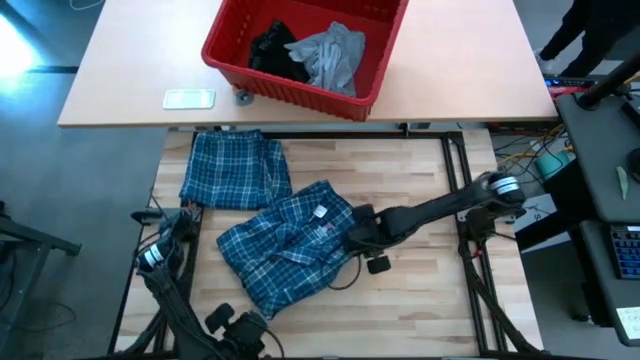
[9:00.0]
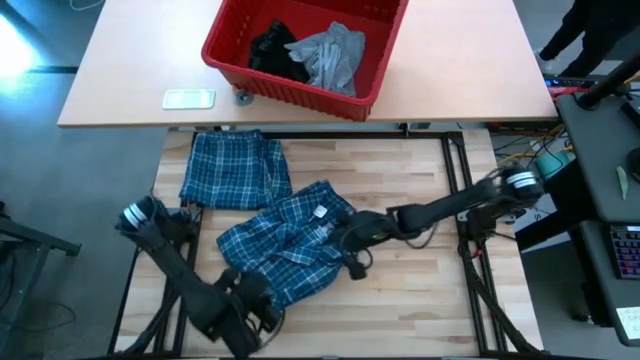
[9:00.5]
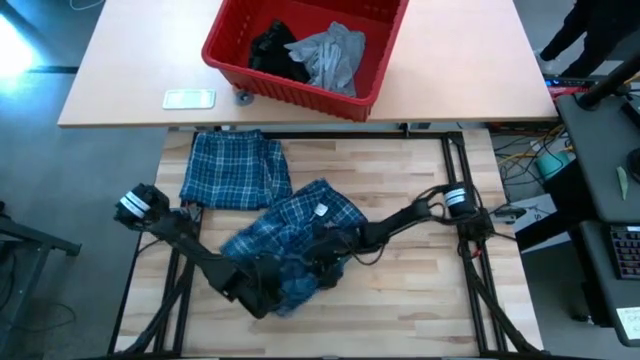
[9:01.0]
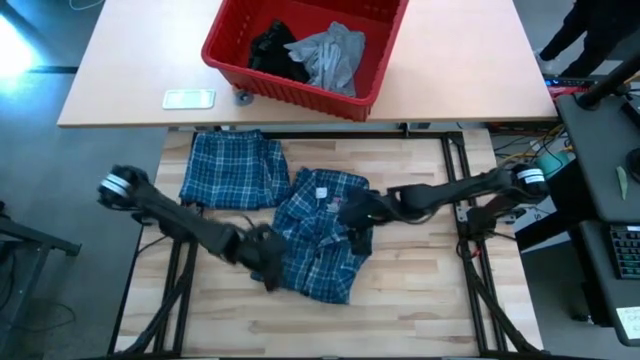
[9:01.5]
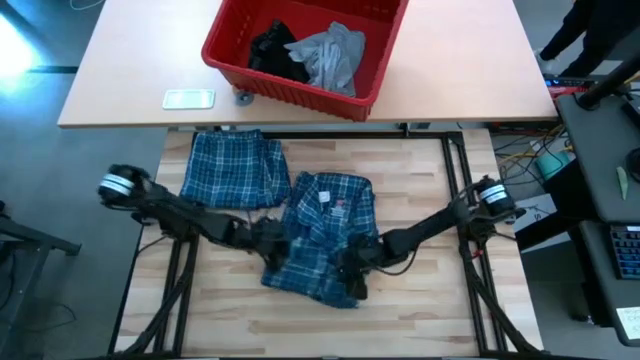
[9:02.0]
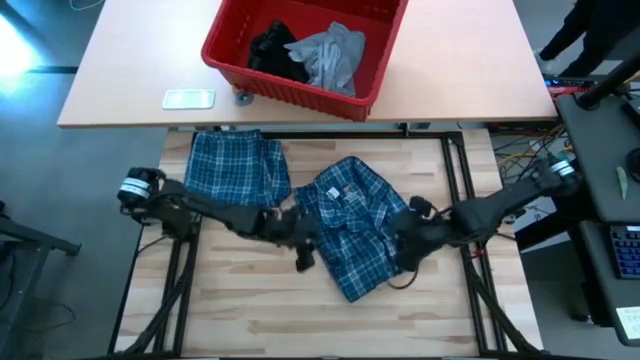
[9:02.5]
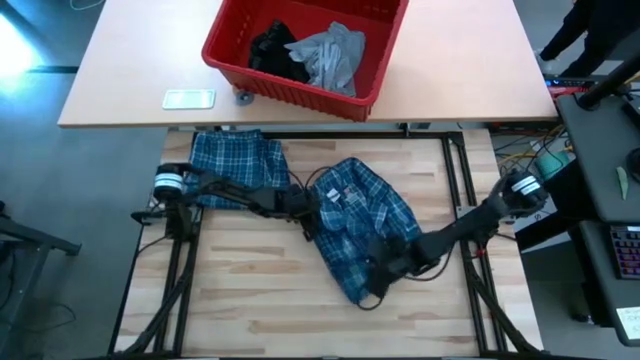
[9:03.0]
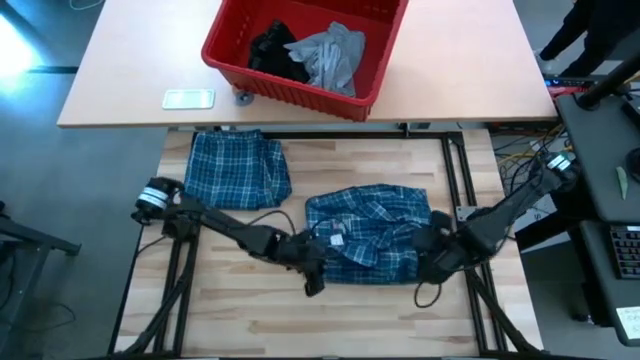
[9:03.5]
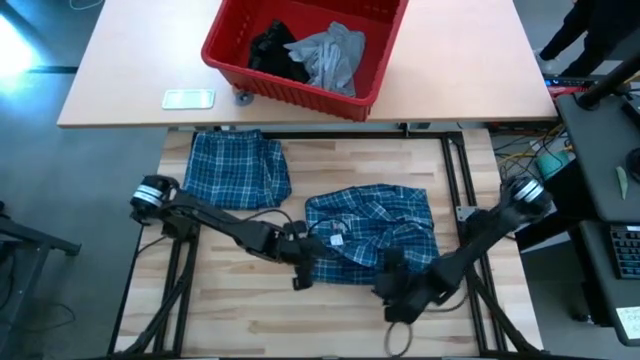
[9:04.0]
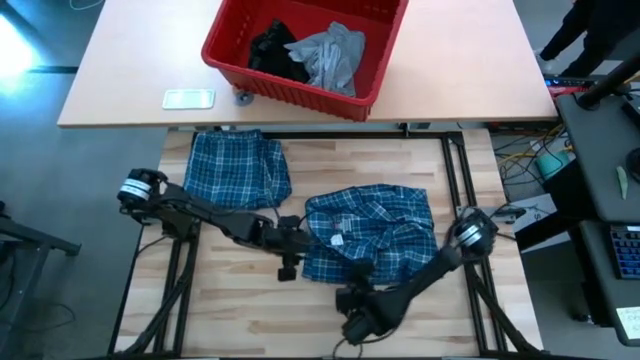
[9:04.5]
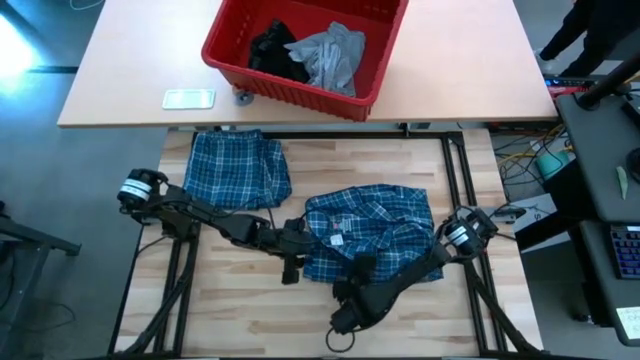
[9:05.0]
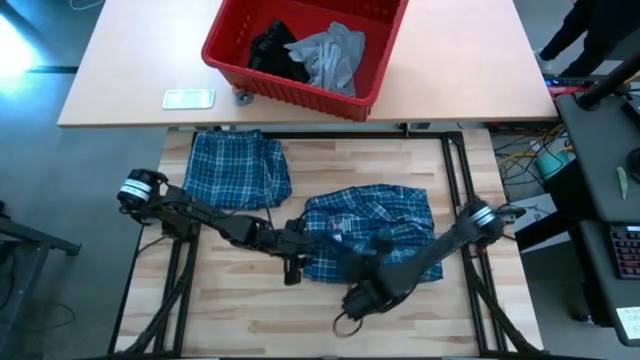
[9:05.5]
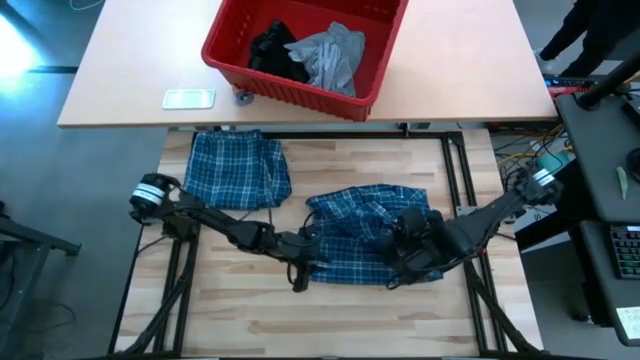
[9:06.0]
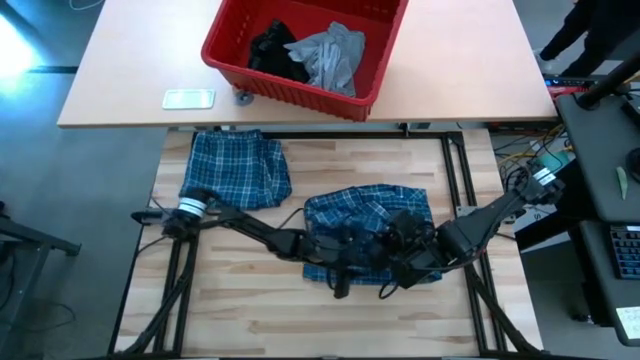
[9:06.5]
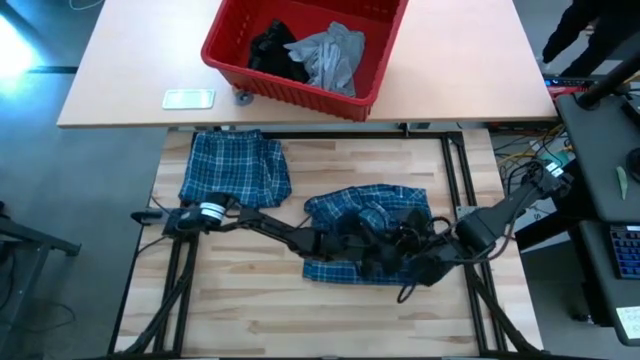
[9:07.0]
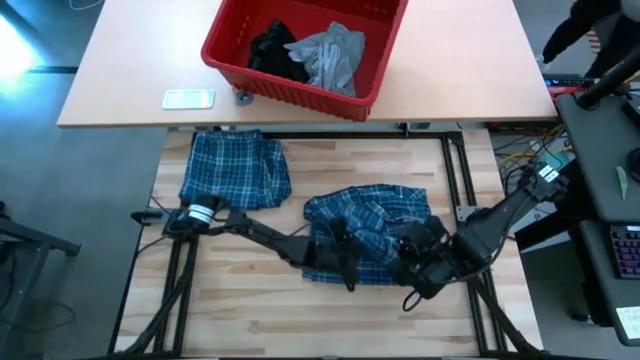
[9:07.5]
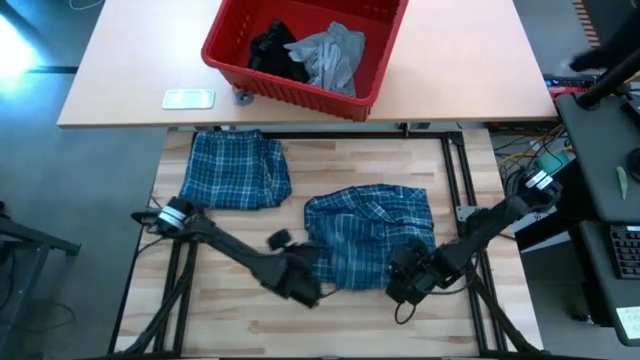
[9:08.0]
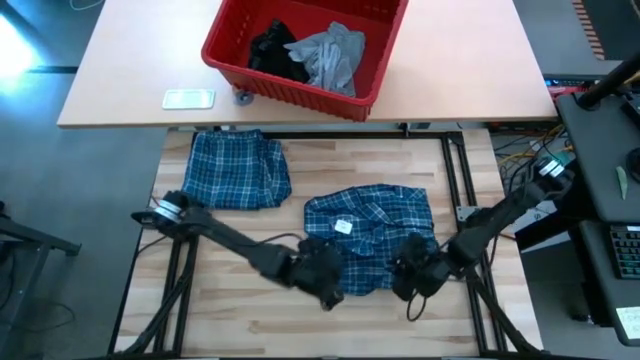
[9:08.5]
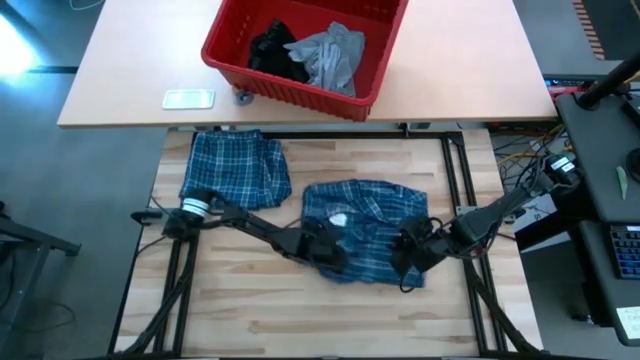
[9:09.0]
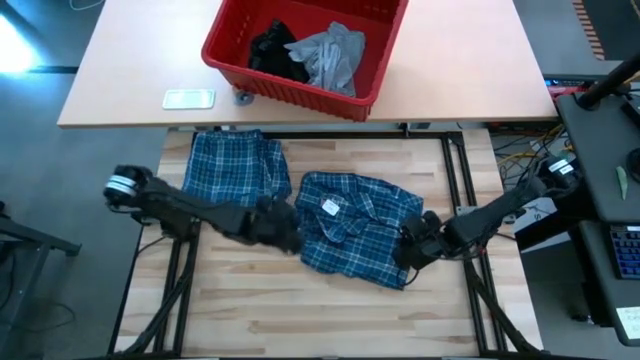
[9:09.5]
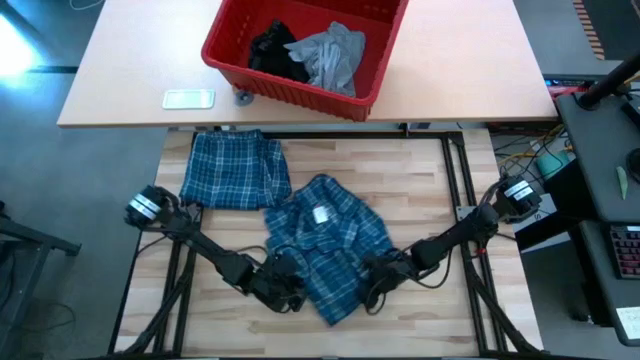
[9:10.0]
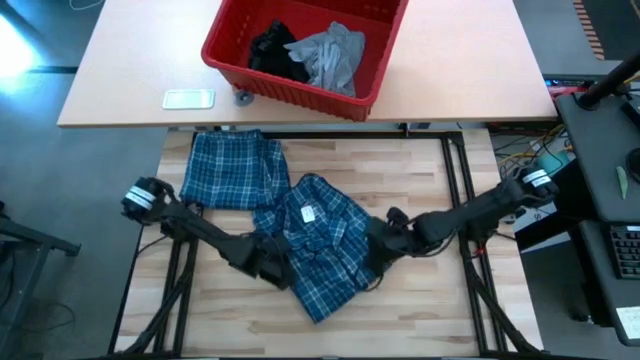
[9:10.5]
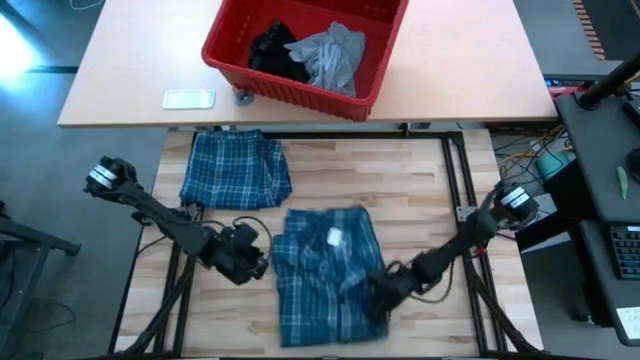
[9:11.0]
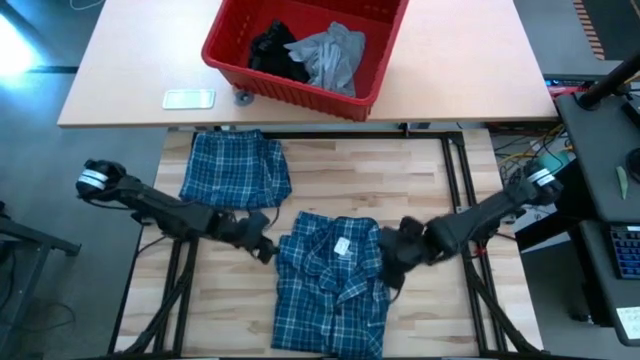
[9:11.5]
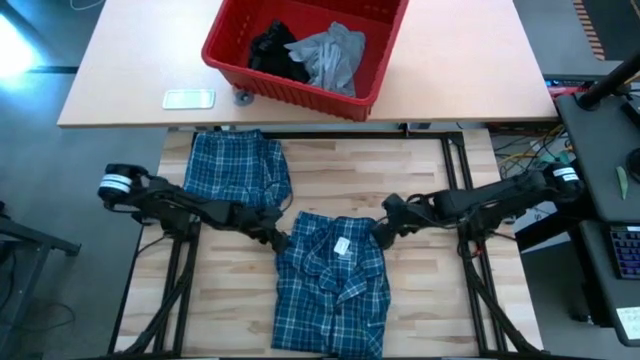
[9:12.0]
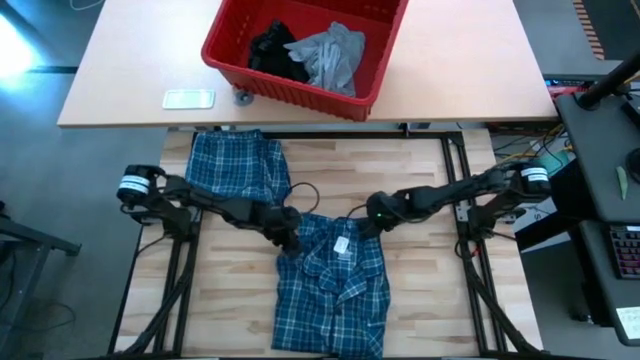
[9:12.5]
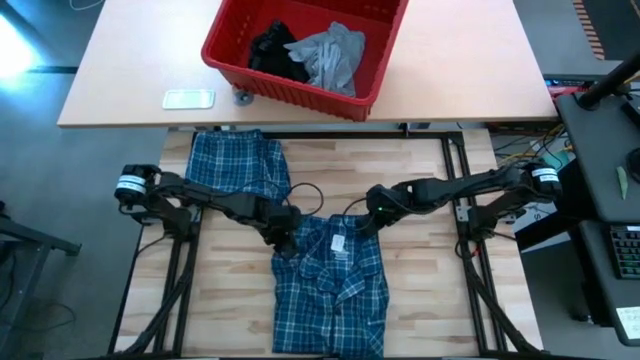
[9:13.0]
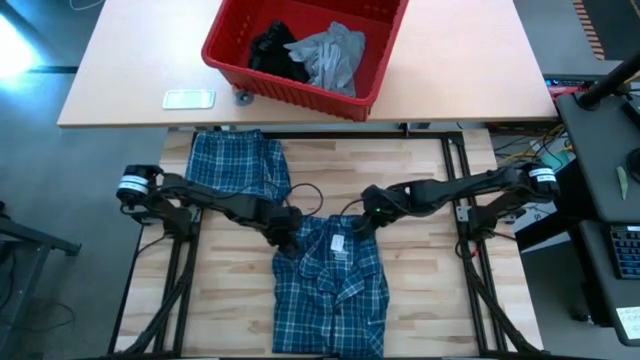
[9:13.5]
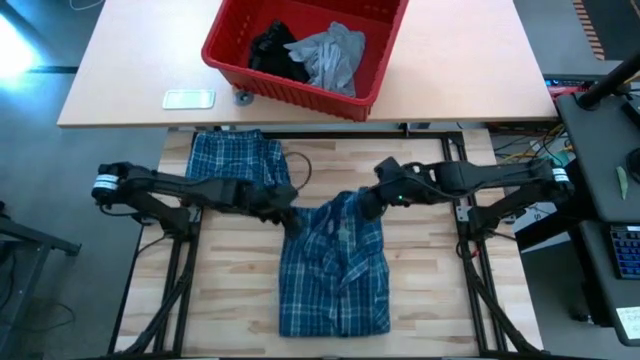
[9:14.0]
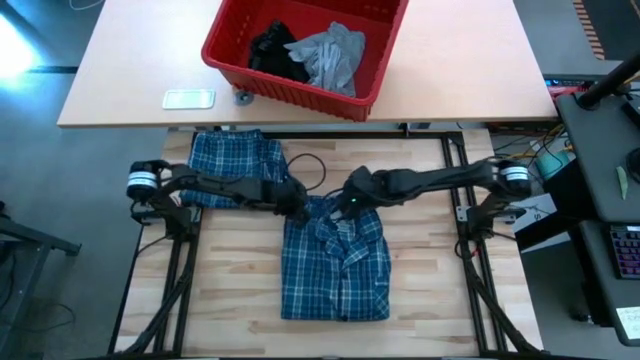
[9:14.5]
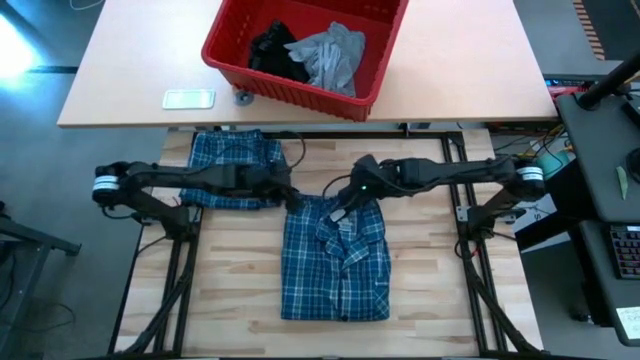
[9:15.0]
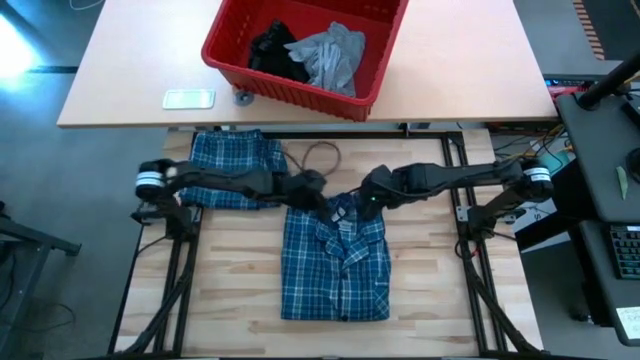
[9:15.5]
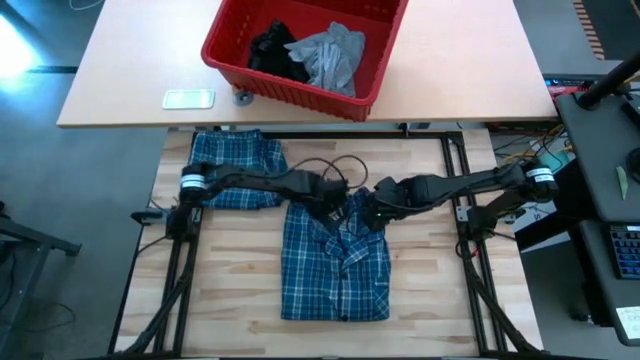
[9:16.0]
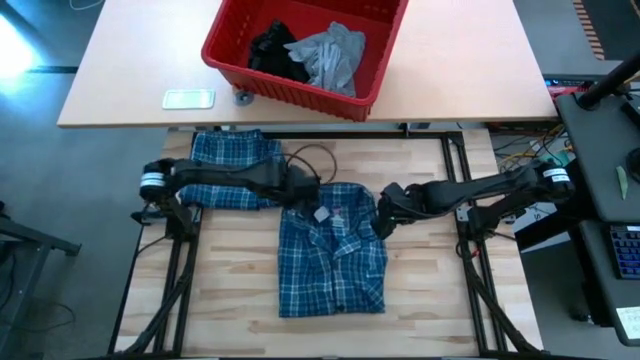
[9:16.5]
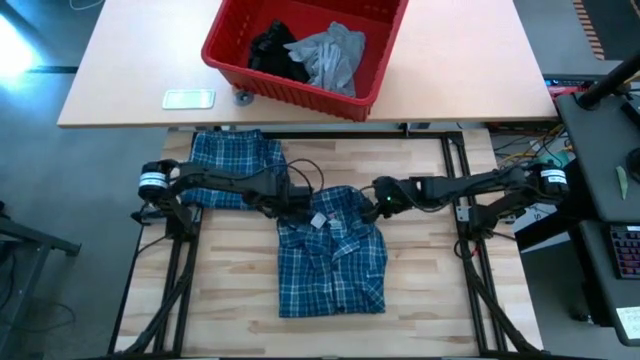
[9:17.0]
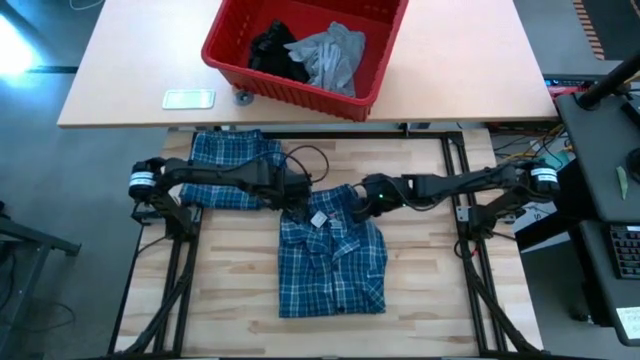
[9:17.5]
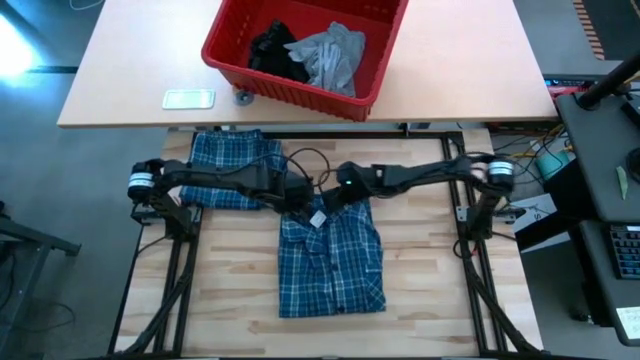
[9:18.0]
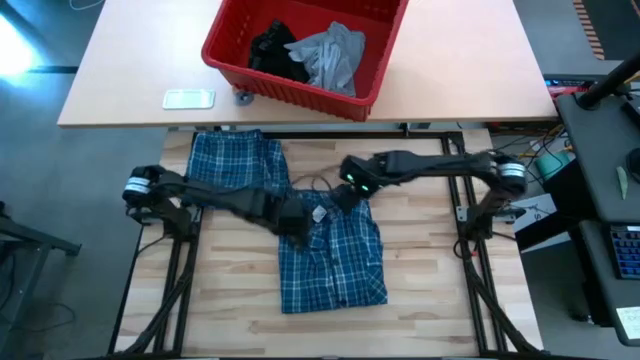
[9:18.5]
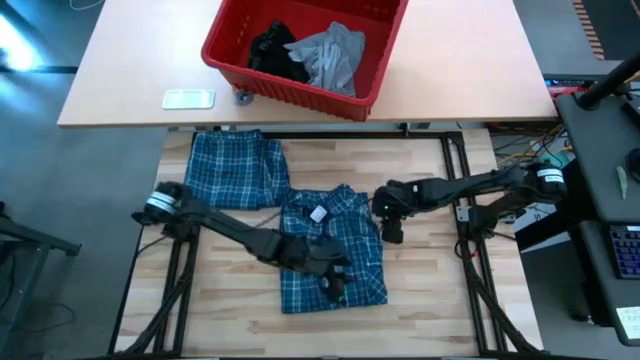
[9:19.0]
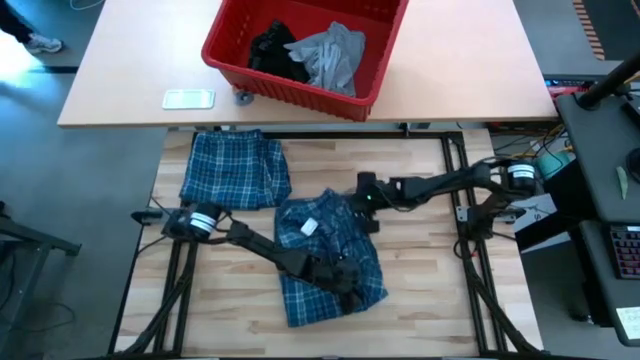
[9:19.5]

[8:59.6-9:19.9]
Task: Fold Laundry from Bin
Fold the blue patterned long sleeve shirt
